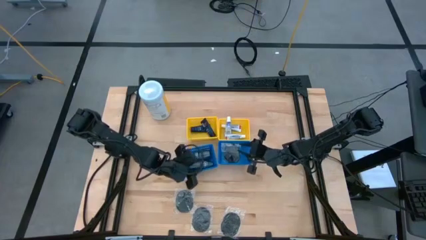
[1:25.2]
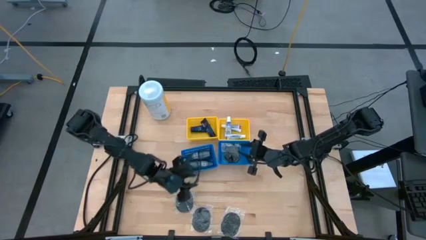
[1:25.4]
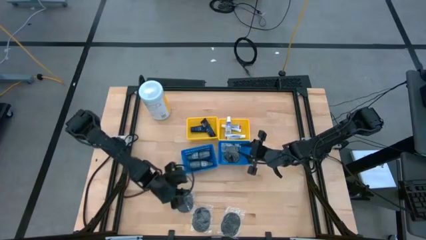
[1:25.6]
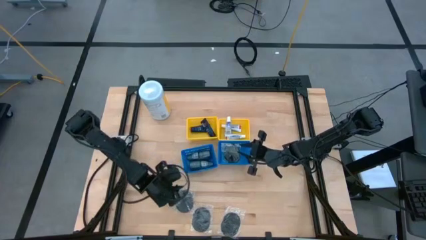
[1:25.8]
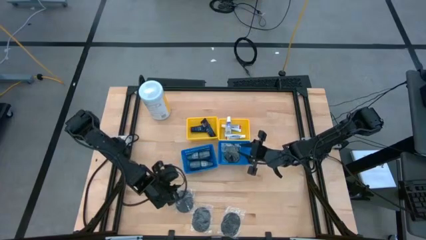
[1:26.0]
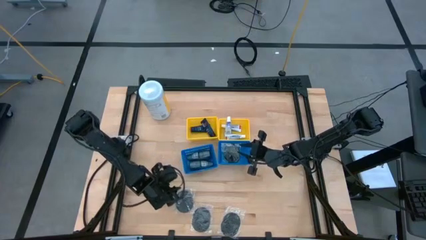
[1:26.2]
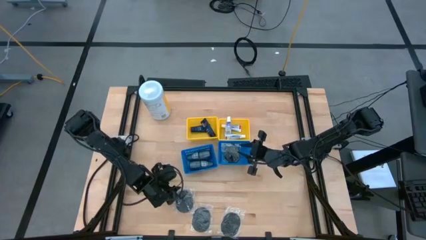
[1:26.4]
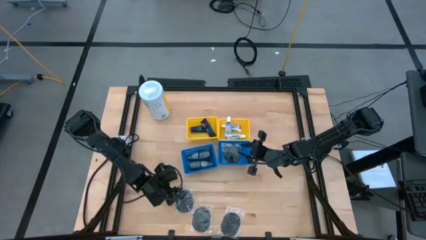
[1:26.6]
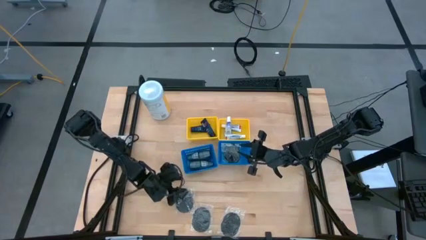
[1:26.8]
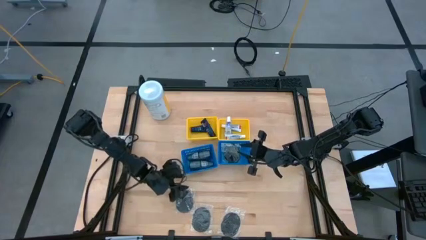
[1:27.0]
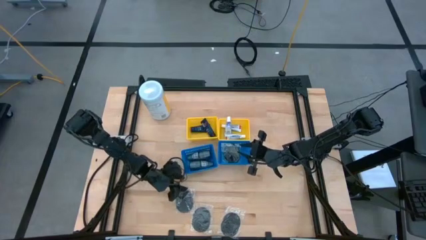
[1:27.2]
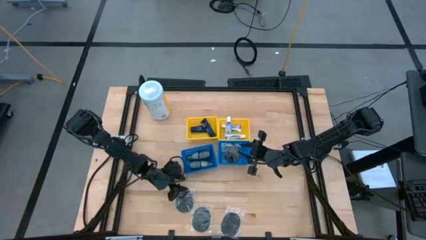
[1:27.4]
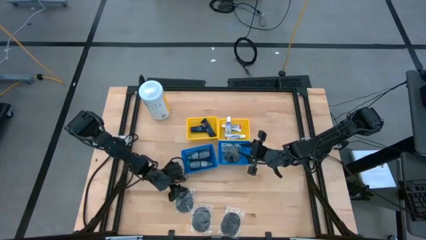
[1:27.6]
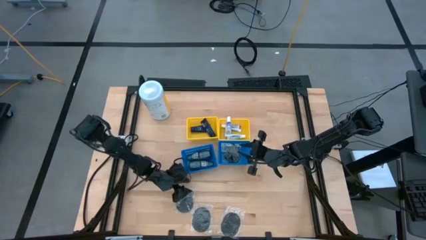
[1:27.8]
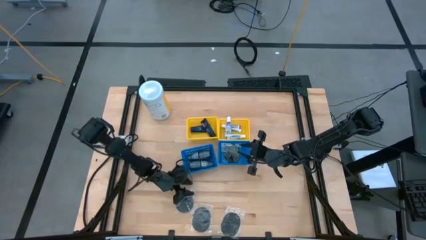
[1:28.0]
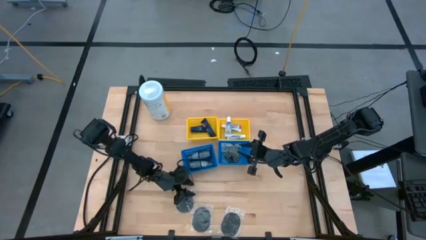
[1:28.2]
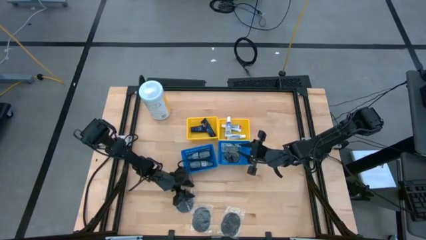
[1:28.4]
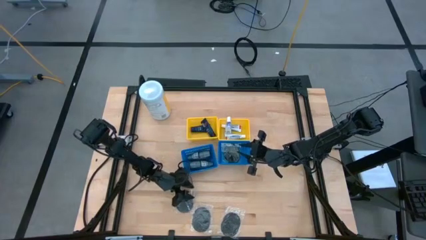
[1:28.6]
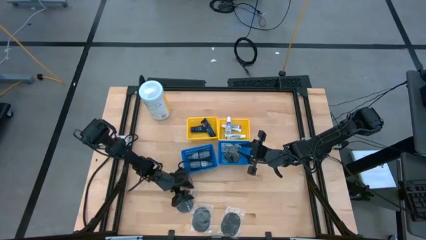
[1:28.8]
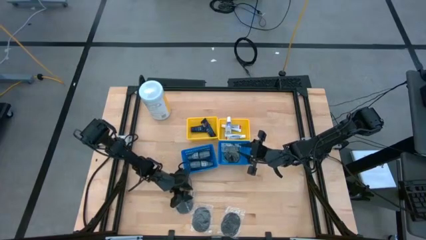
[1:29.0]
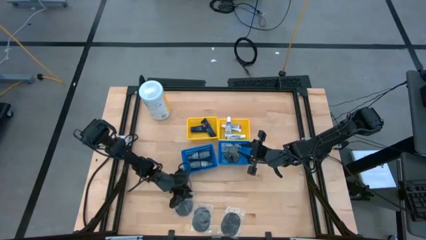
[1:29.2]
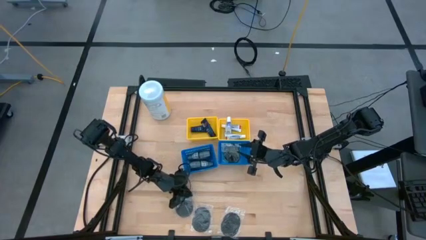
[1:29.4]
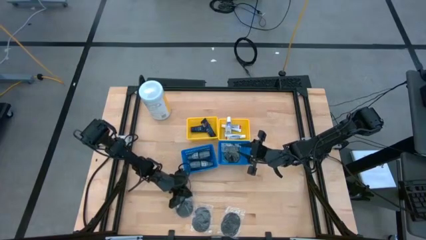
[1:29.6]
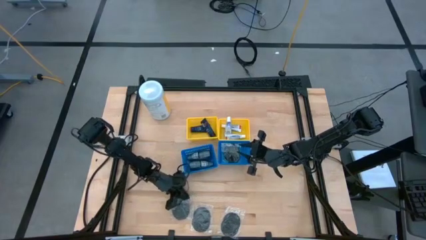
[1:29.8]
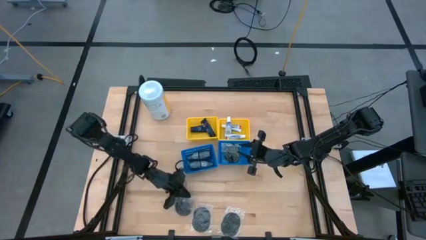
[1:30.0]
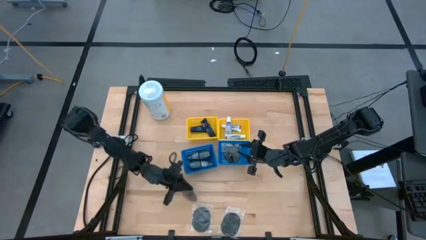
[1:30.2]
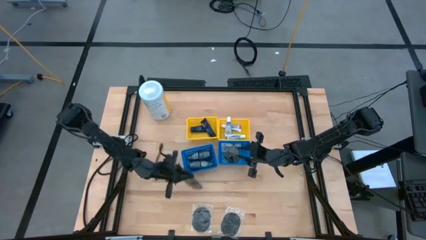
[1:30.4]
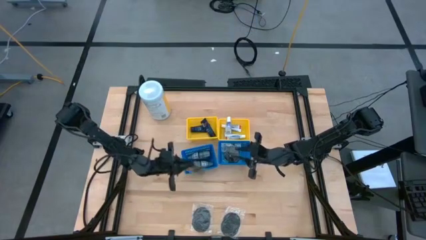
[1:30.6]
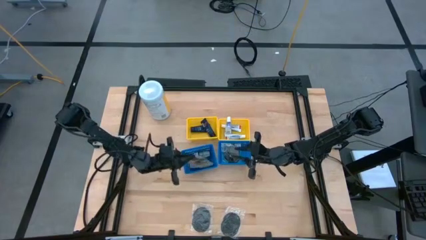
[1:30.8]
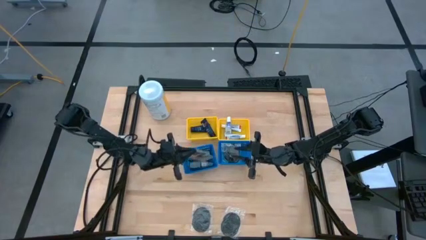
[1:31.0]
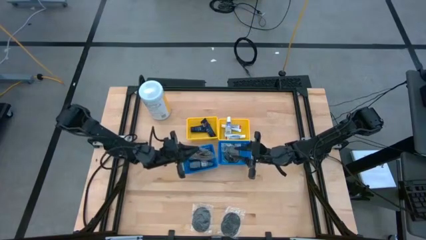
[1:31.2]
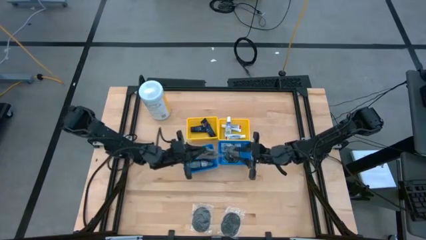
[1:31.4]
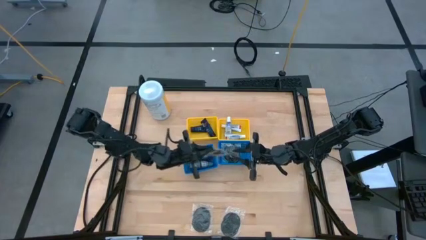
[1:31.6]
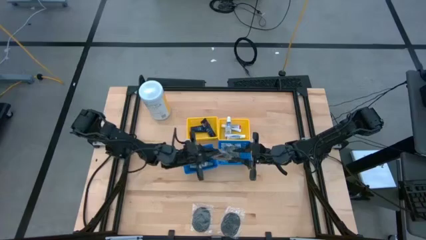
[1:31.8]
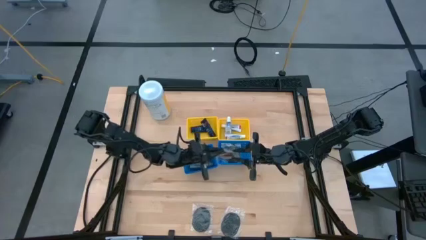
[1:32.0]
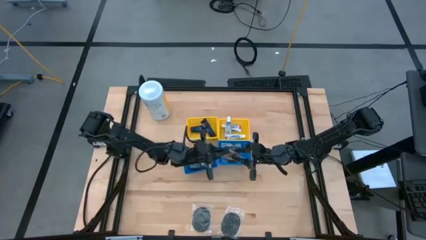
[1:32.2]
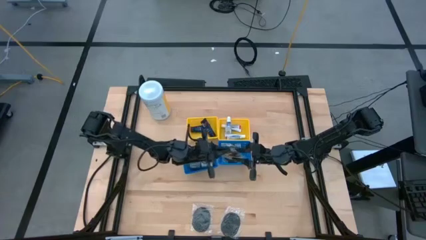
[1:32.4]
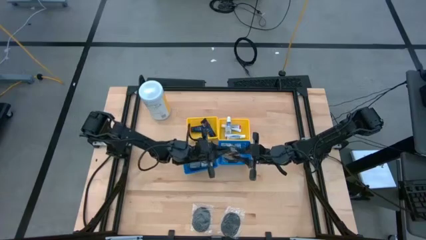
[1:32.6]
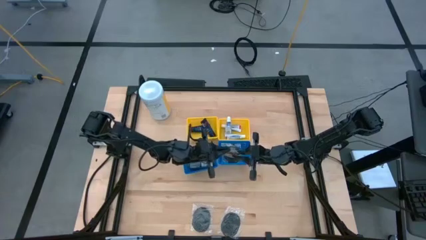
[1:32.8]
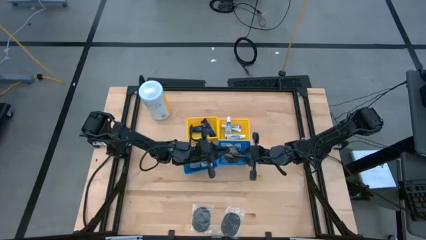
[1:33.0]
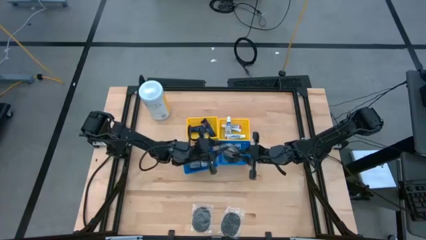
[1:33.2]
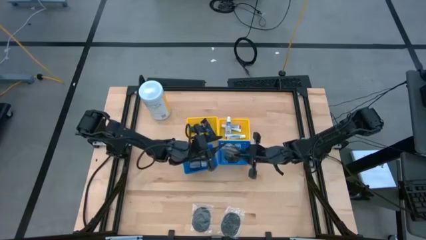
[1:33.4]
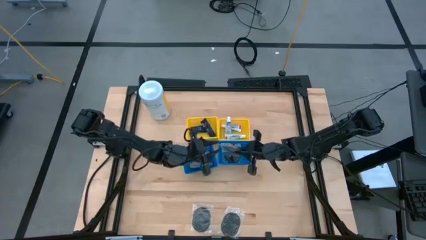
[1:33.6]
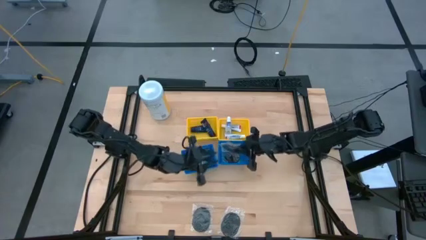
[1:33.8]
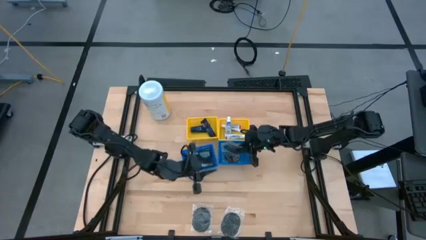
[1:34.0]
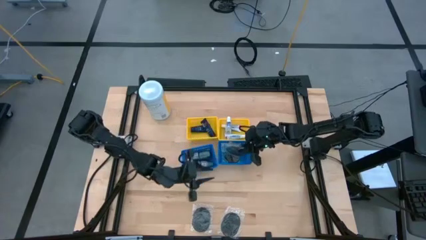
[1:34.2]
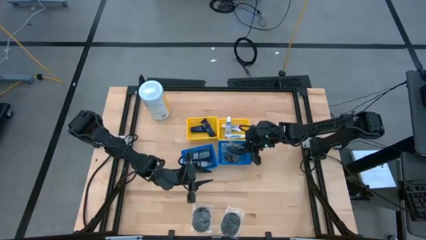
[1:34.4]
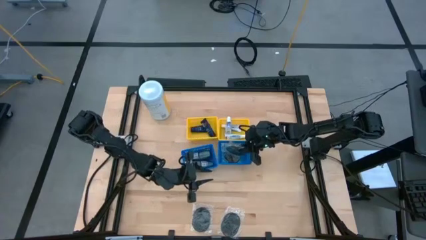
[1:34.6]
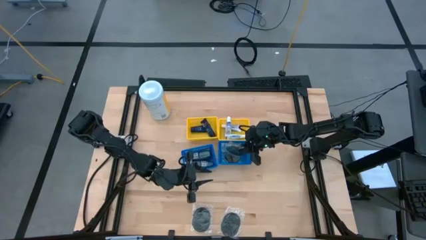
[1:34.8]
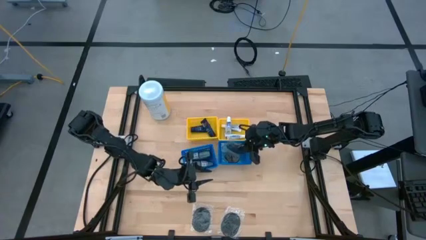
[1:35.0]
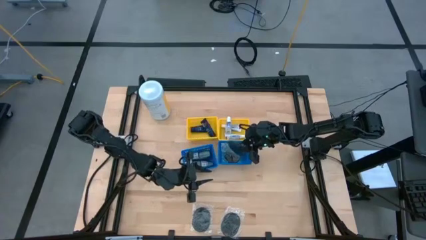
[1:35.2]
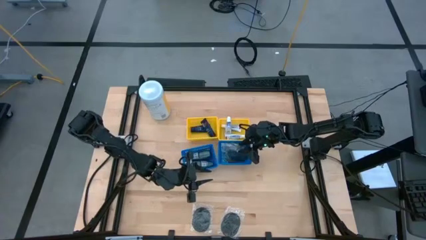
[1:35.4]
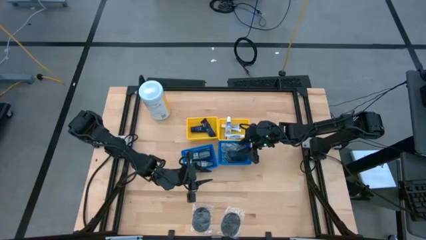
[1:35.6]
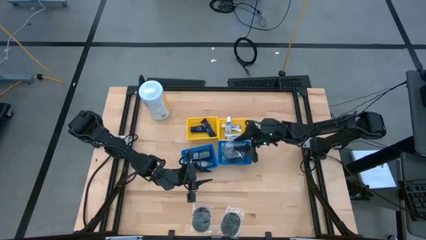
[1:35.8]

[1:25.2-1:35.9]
Task: Pick & Place Travel size toiletries
Put the top hairbrush into the top blue bin

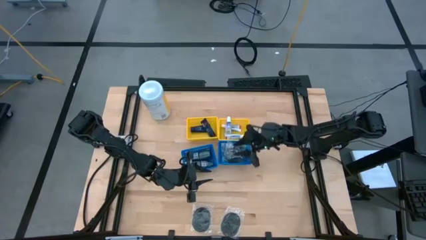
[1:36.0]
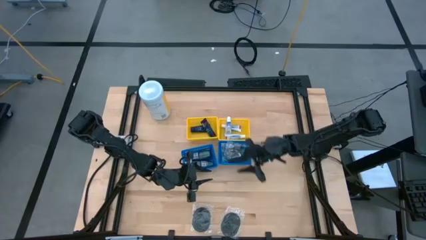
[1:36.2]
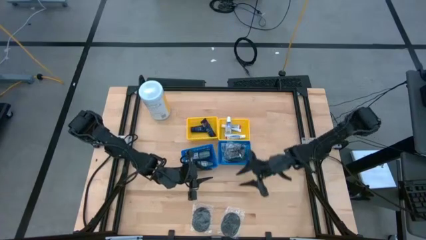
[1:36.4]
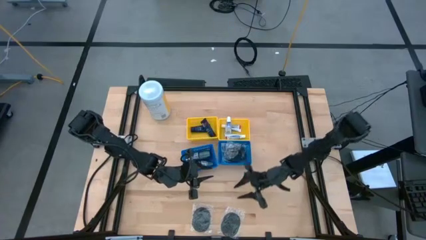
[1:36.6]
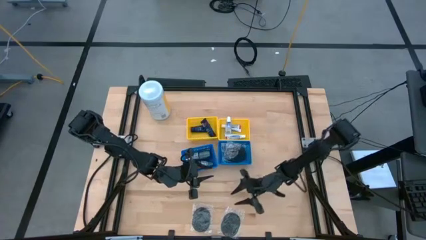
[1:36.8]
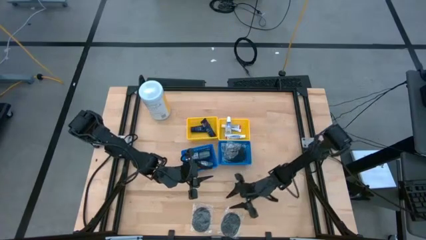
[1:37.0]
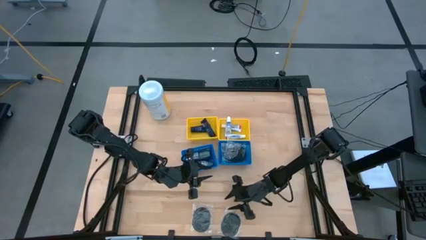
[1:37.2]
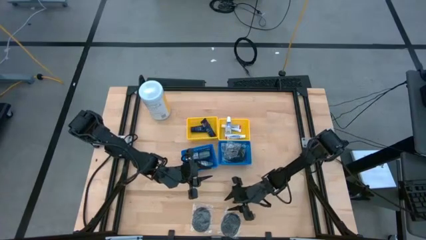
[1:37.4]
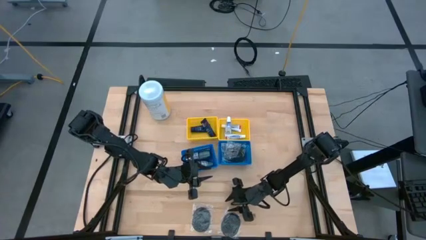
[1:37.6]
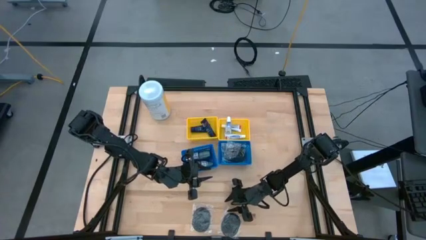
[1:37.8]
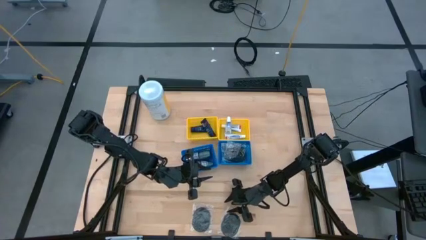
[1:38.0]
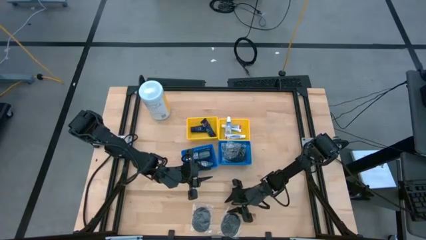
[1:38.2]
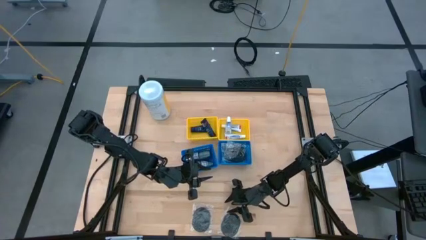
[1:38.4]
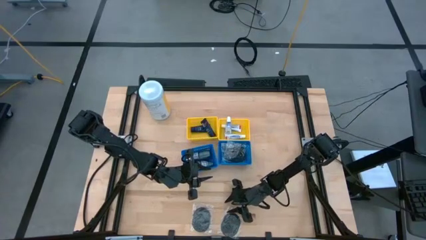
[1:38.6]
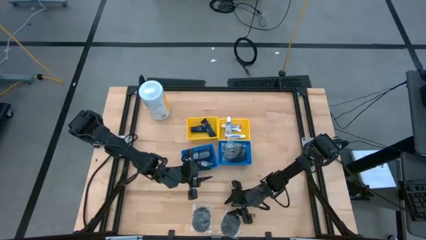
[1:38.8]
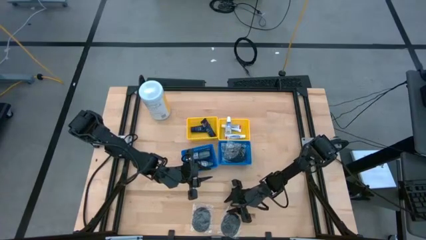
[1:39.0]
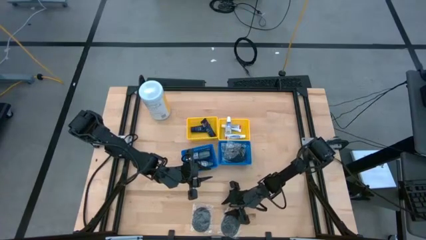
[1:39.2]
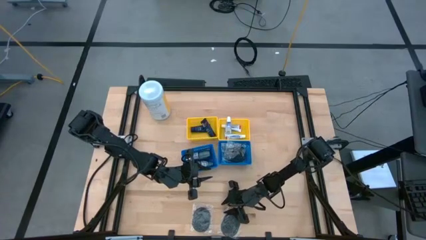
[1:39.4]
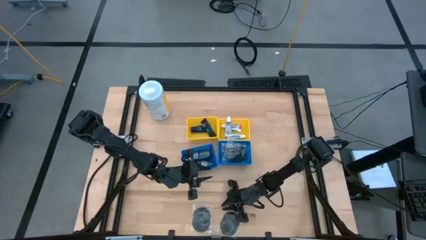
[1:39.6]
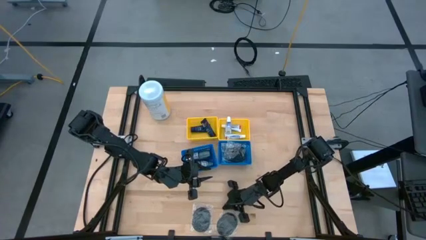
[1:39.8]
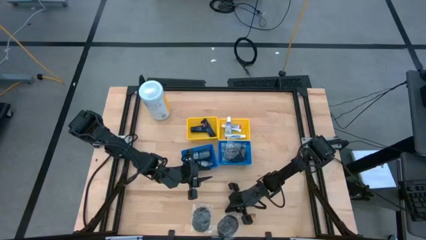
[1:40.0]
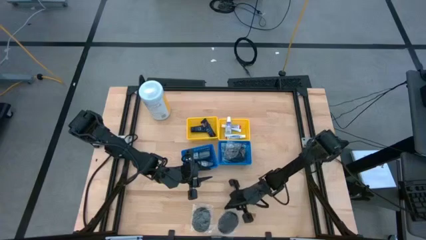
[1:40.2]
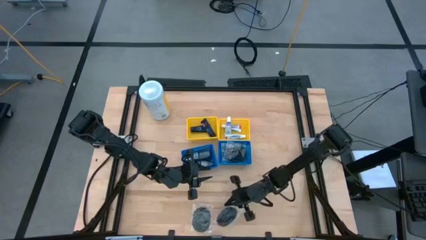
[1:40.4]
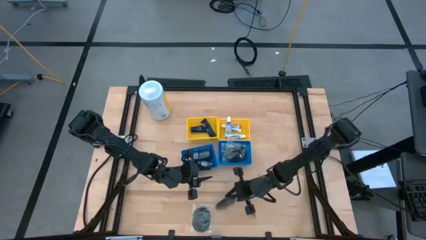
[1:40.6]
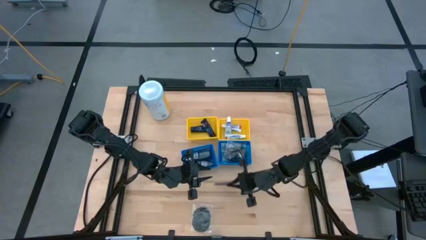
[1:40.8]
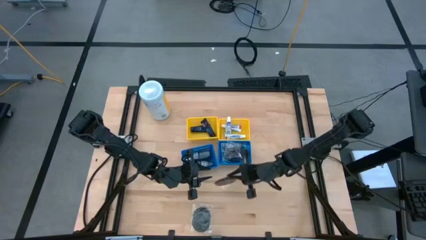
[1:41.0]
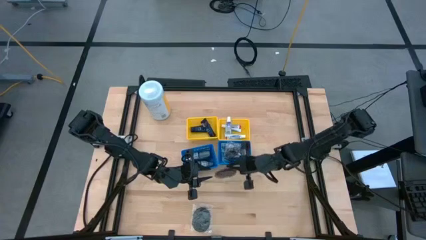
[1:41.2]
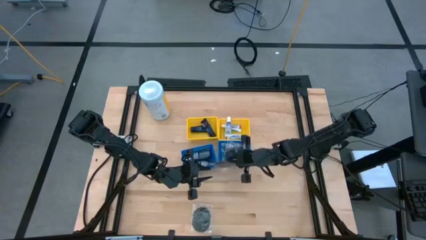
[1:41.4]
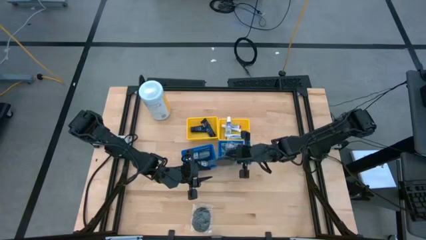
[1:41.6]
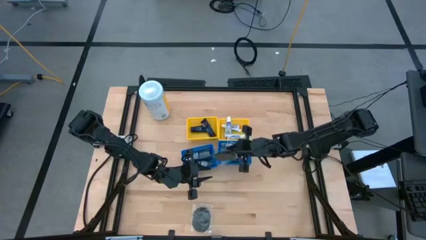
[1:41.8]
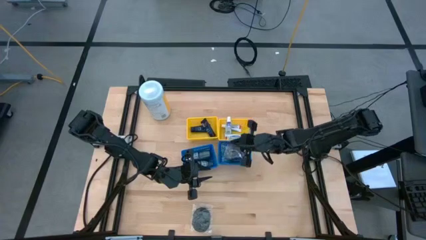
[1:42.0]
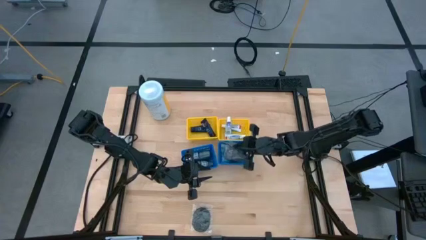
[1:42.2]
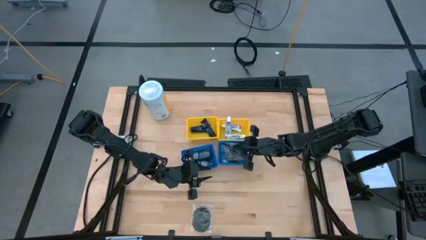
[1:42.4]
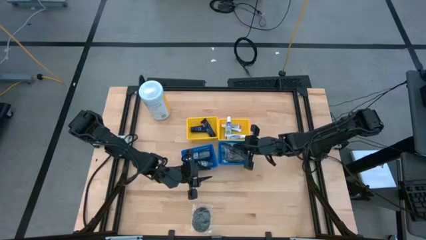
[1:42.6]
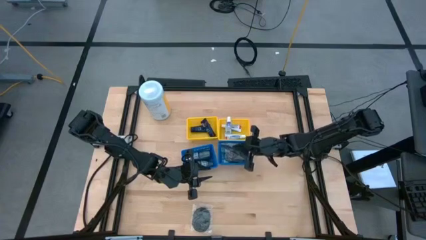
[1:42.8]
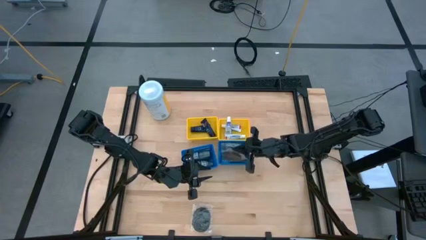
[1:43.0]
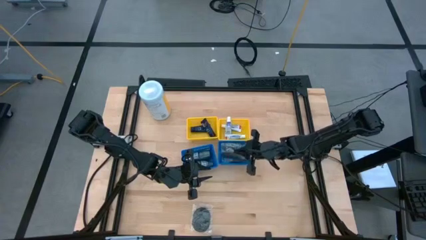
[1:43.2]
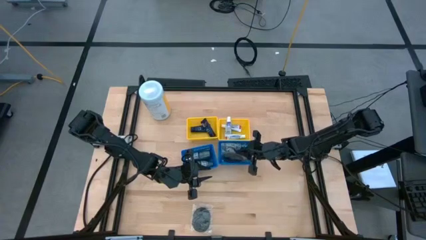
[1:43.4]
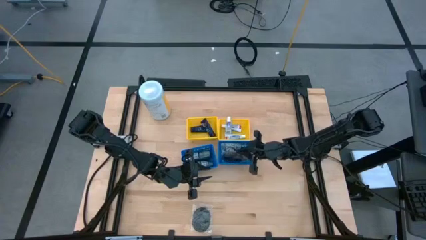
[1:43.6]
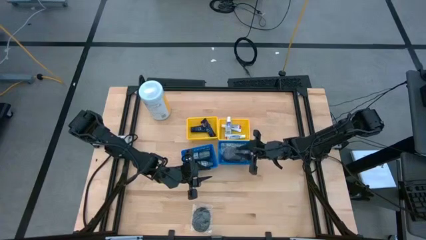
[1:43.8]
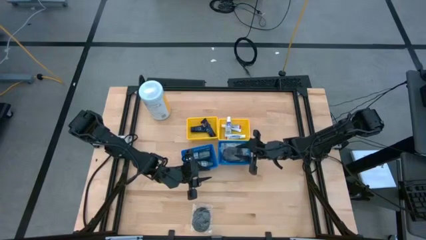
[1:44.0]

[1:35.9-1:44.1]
Put the right hairbrush into the right blue bin
